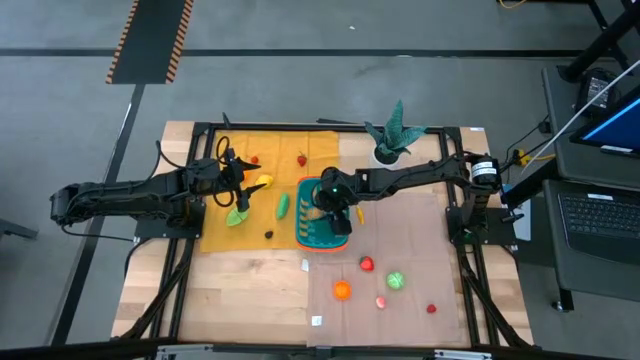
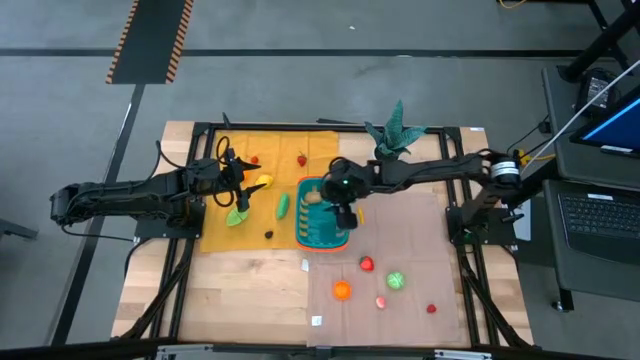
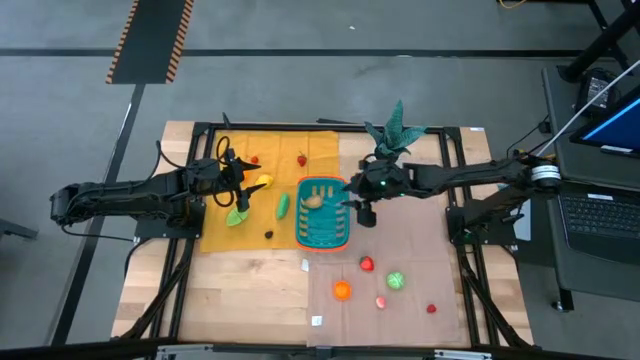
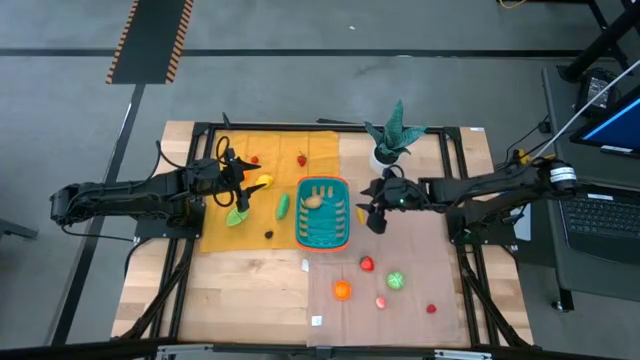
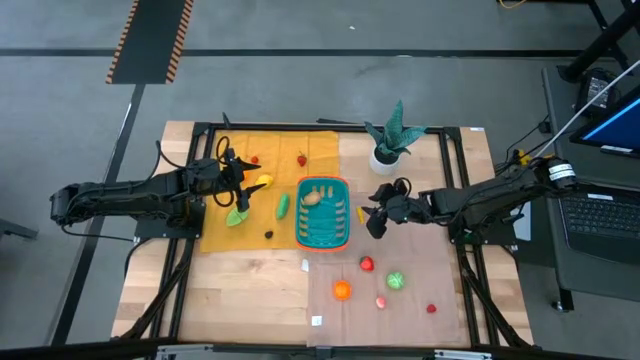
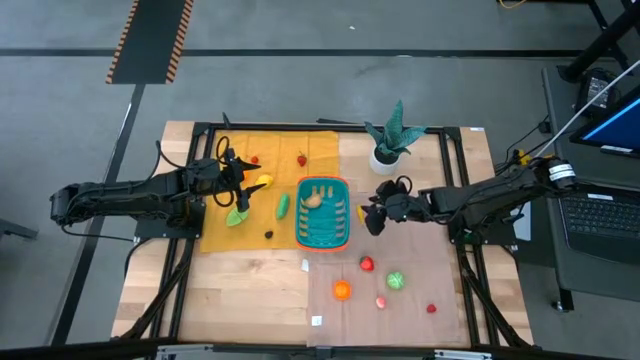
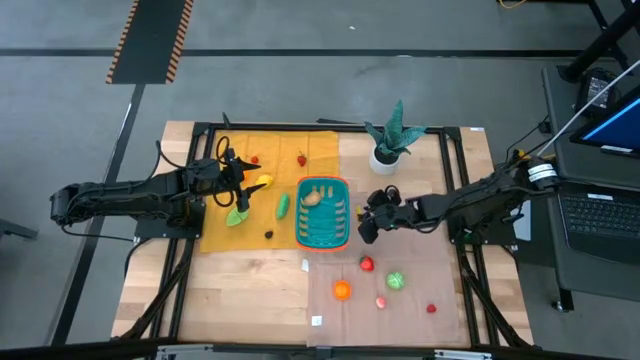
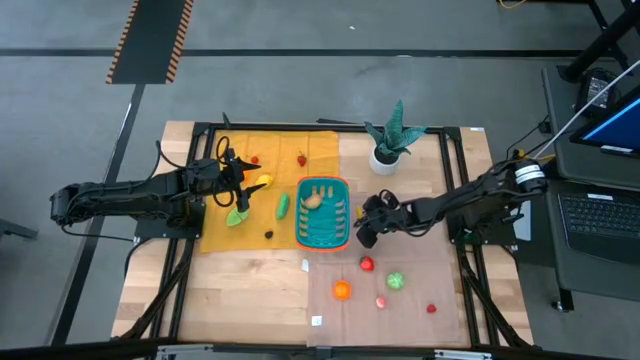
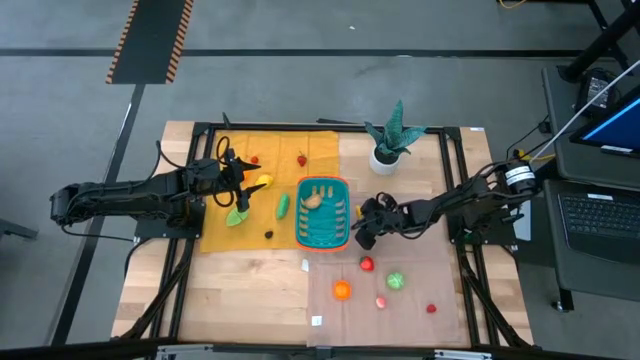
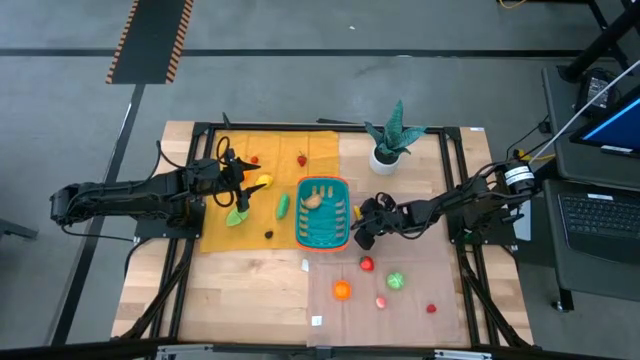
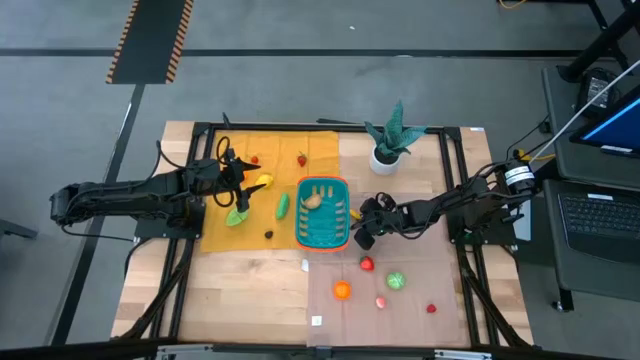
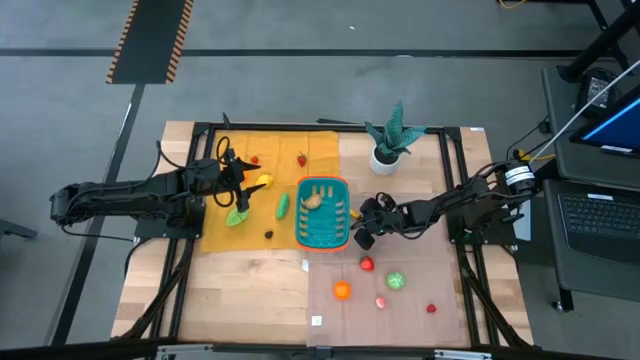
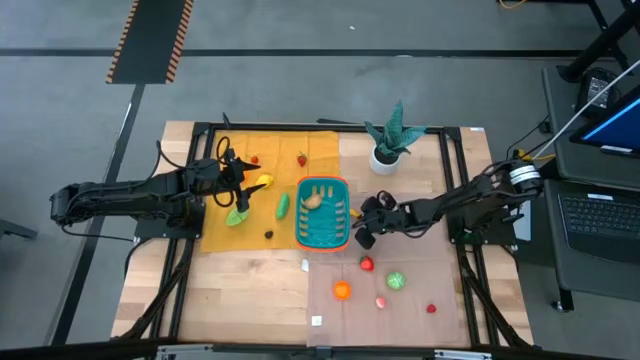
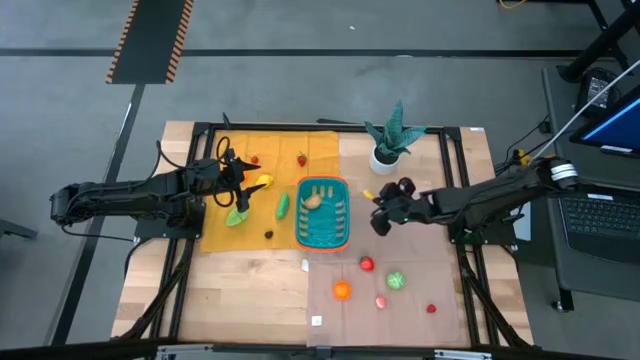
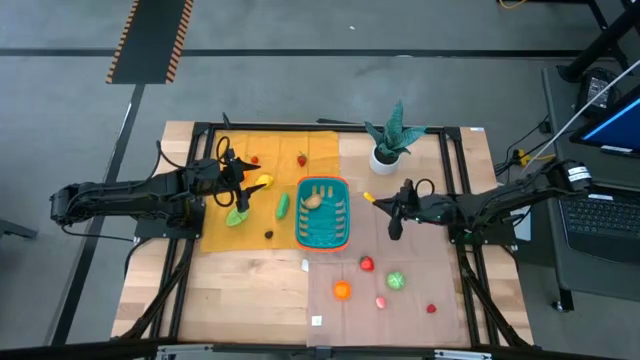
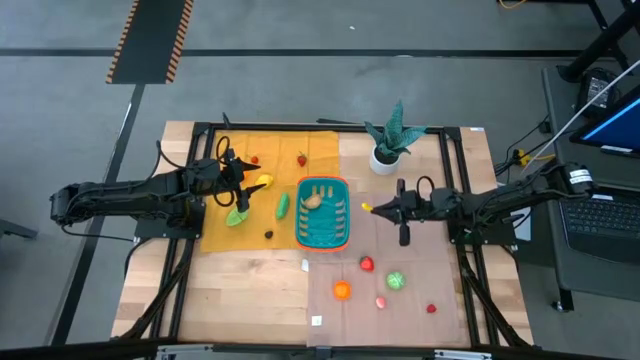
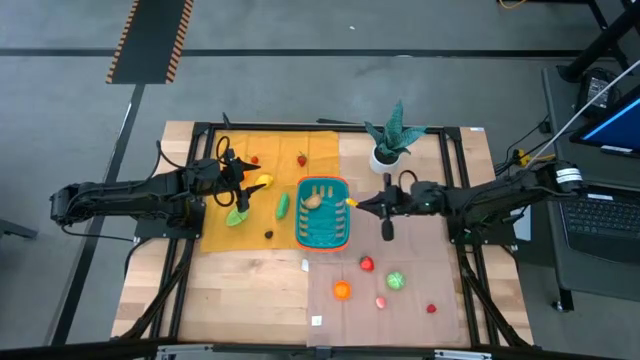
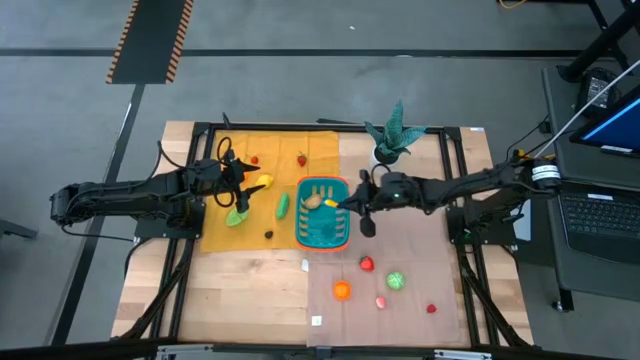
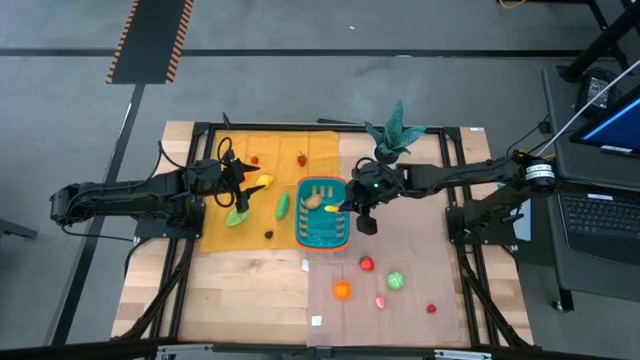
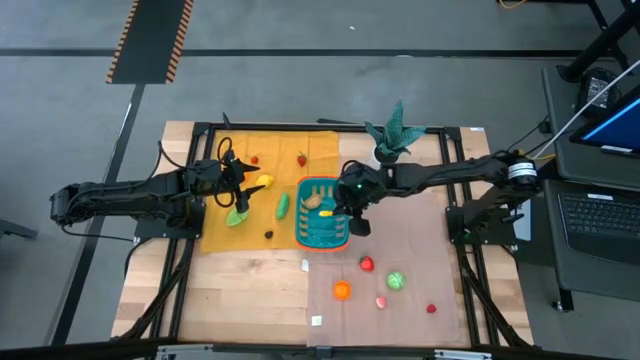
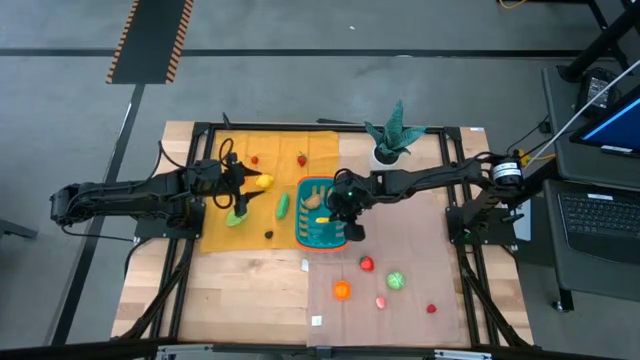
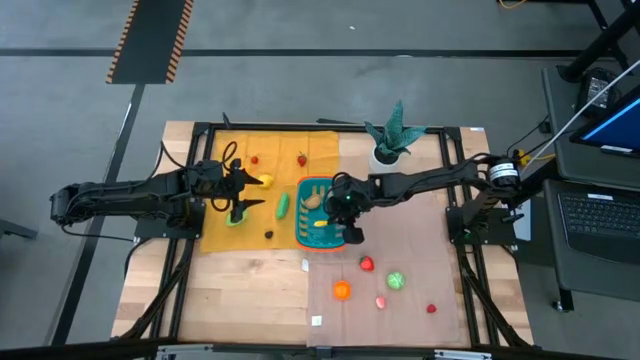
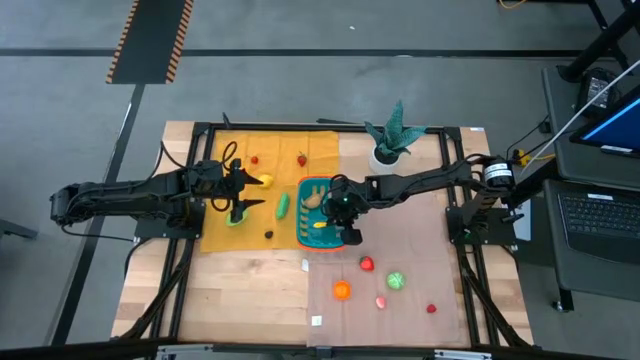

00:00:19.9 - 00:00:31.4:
Task: Pick and placing Produce into tupperware
Put the corn into the basket

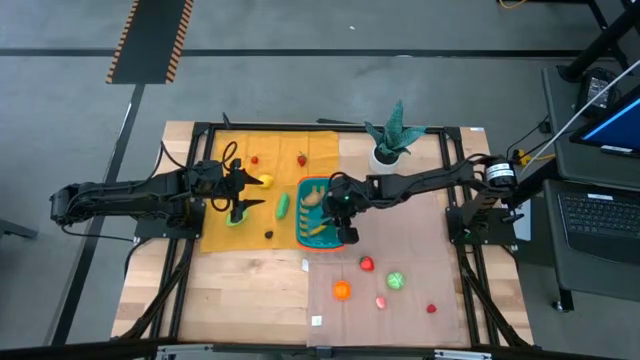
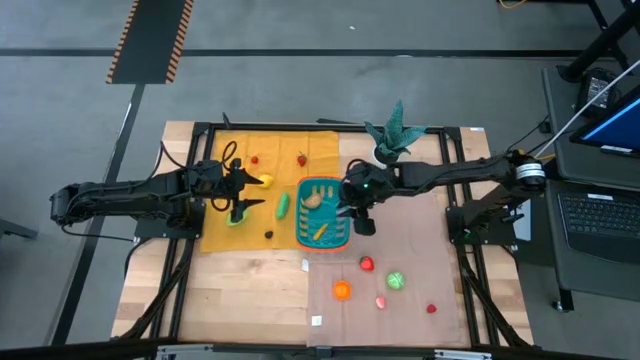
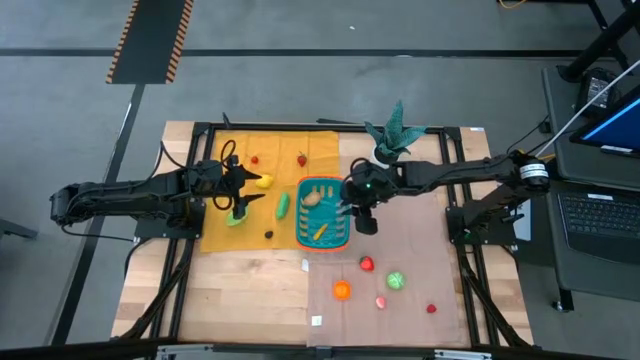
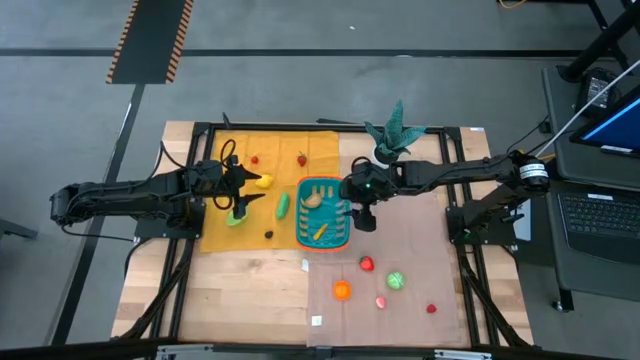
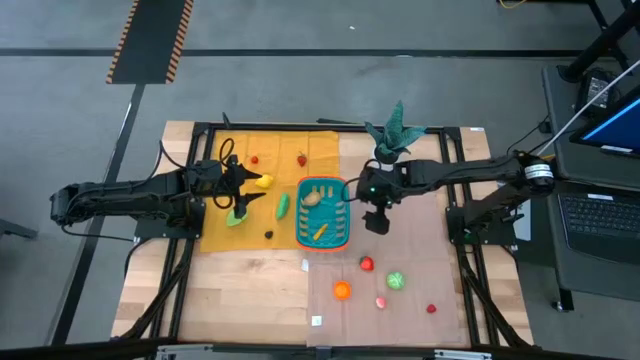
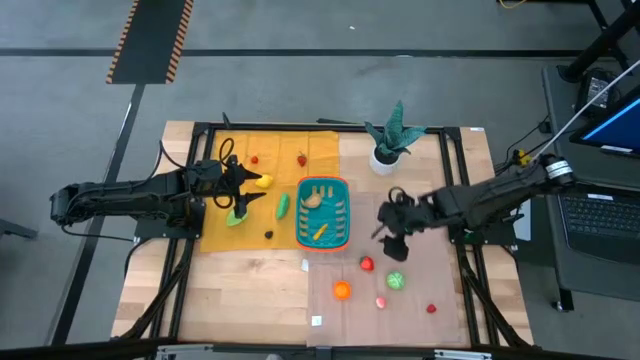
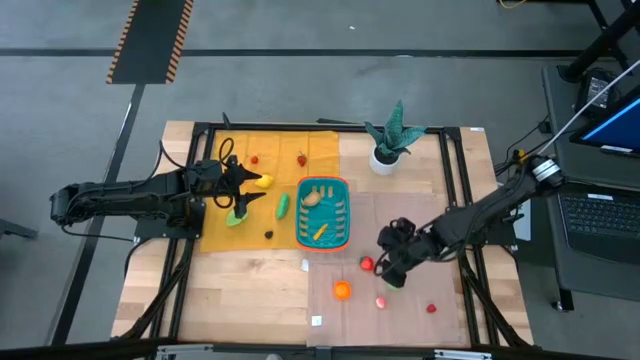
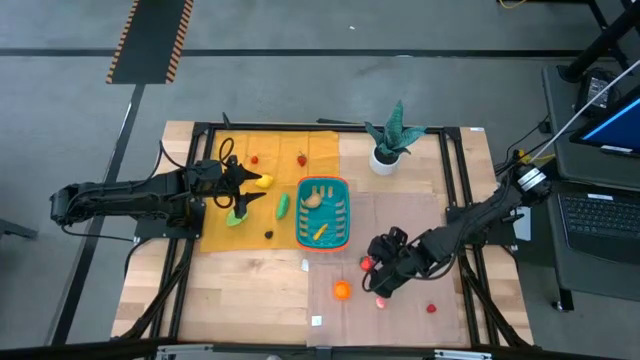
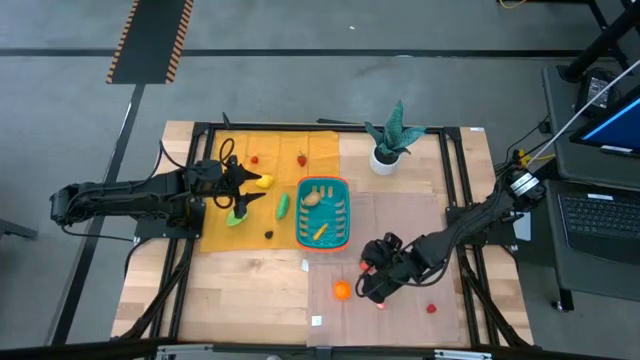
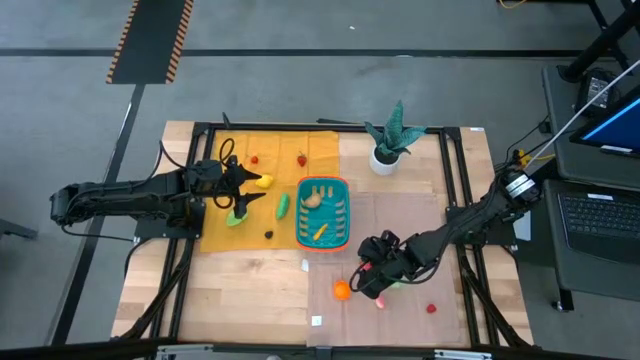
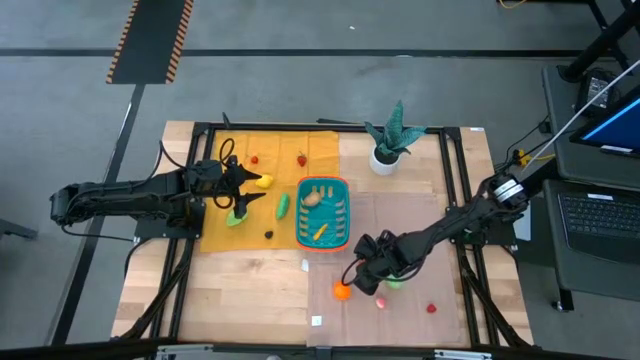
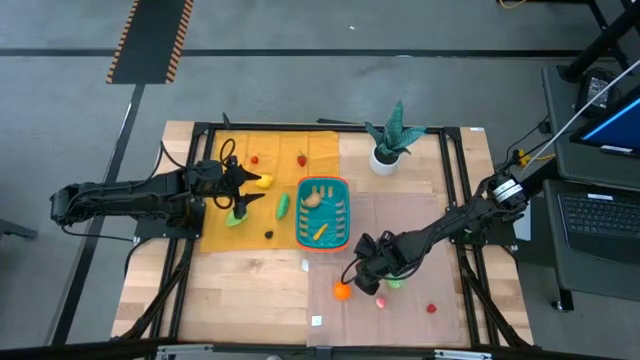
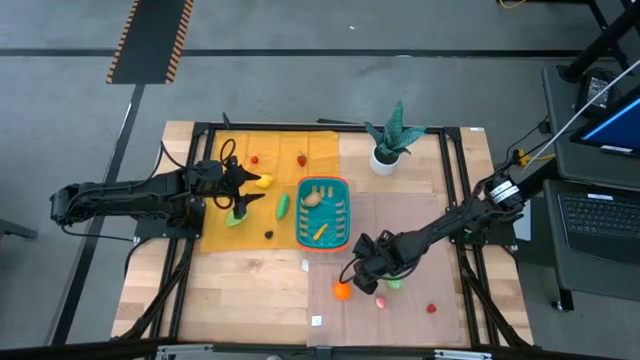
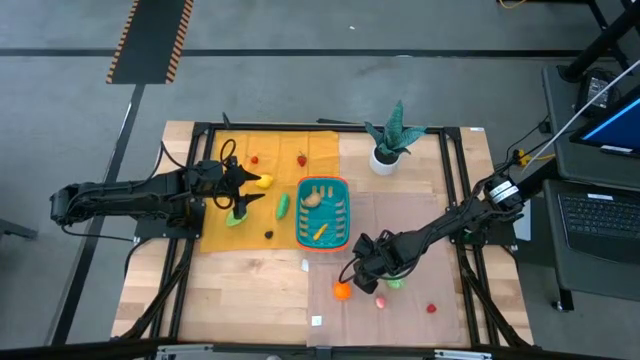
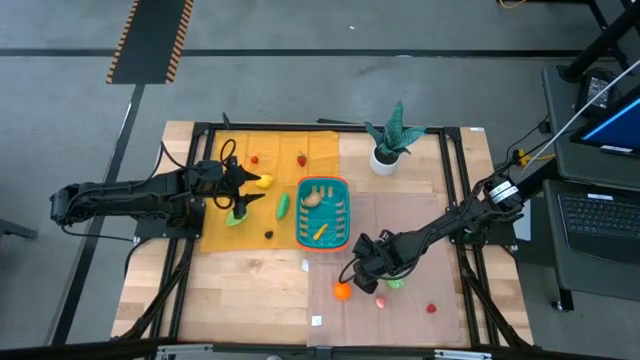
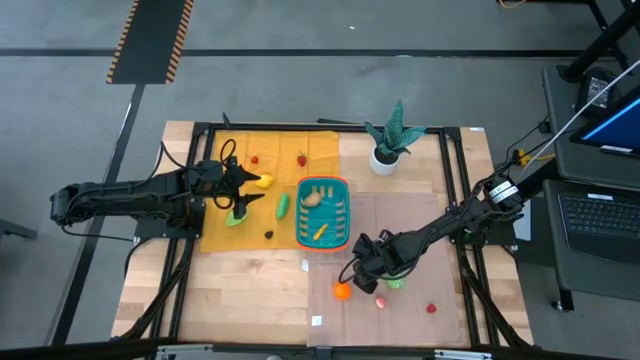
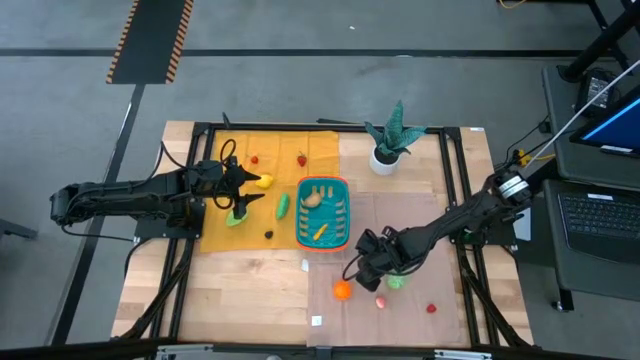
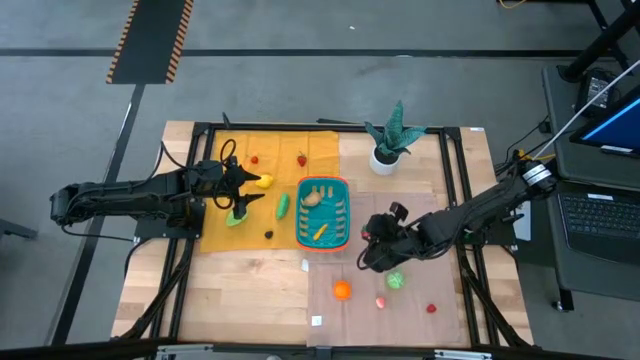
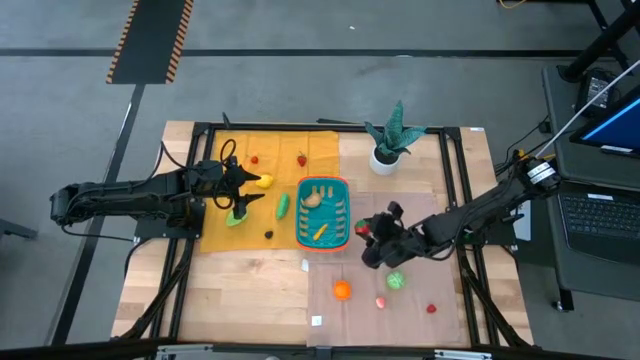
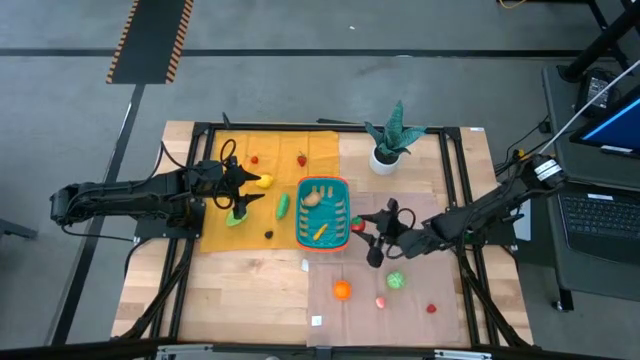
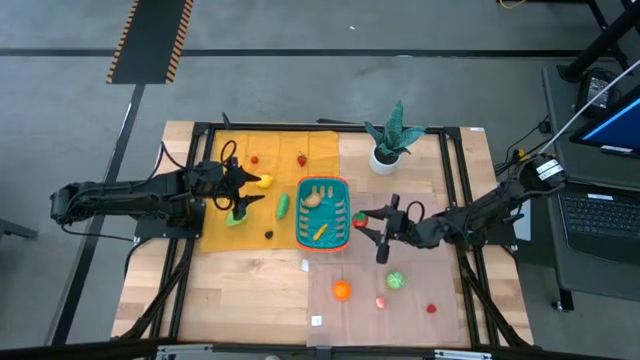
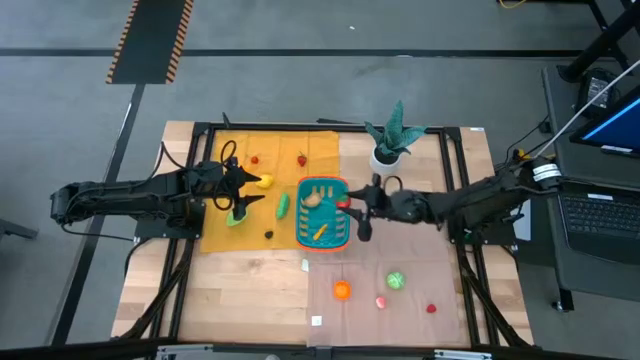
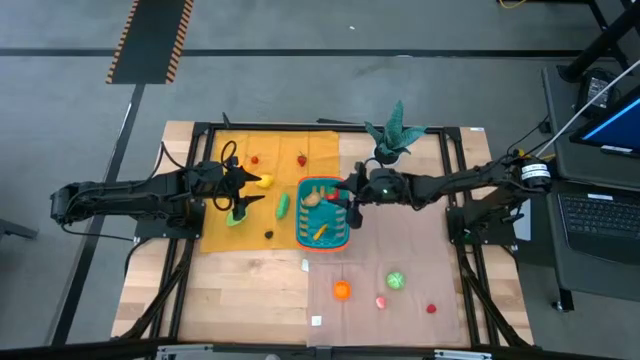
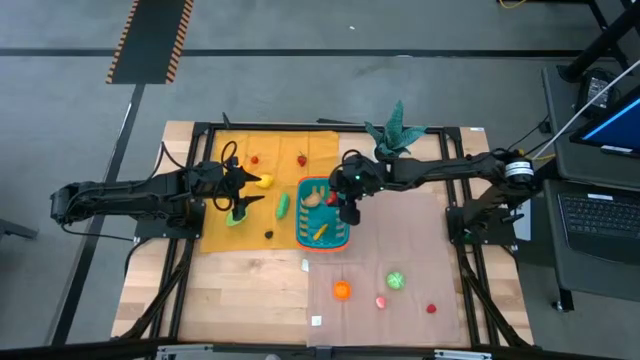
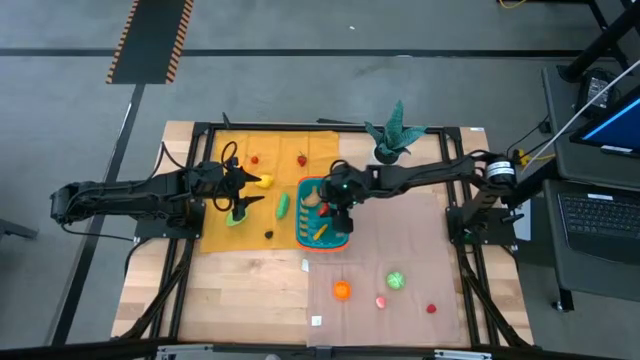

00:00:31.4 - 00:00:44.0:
Put the bottom strawberry into the basket
